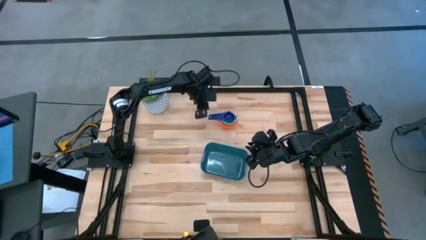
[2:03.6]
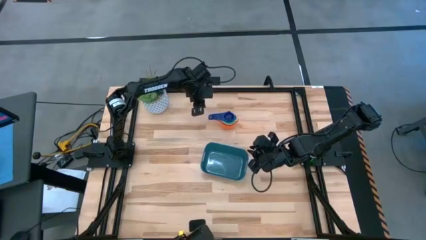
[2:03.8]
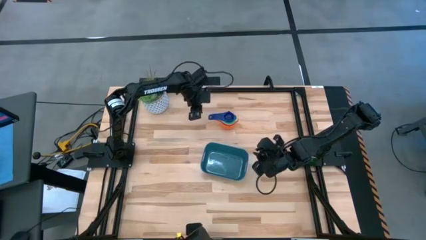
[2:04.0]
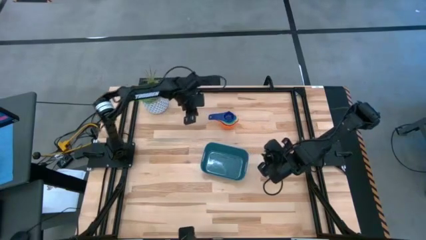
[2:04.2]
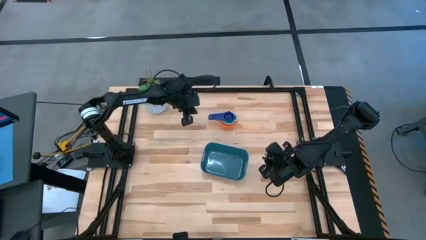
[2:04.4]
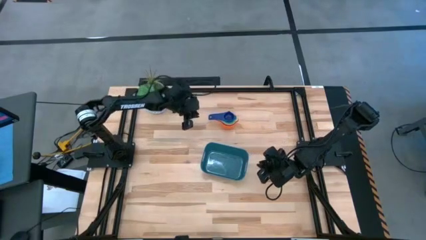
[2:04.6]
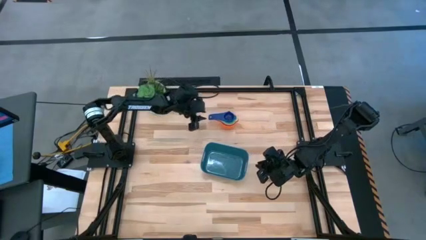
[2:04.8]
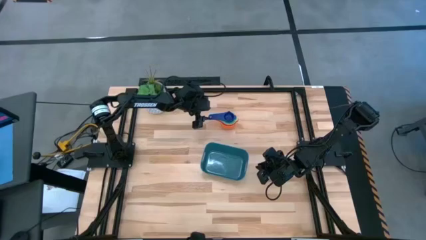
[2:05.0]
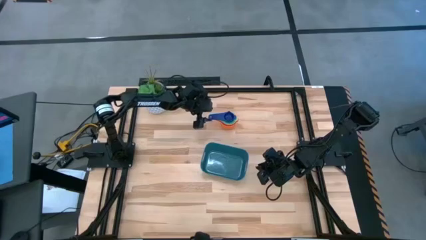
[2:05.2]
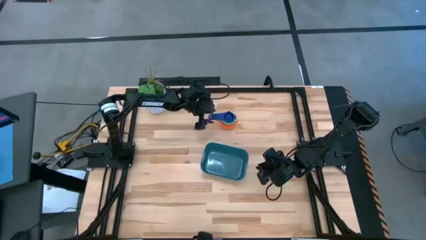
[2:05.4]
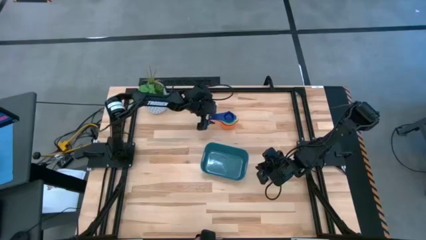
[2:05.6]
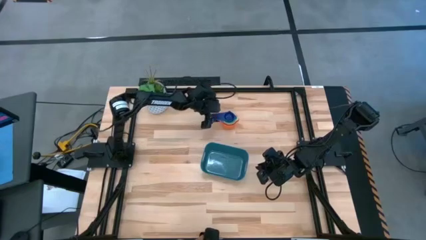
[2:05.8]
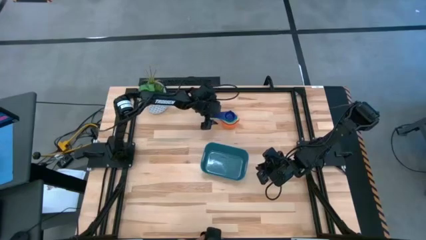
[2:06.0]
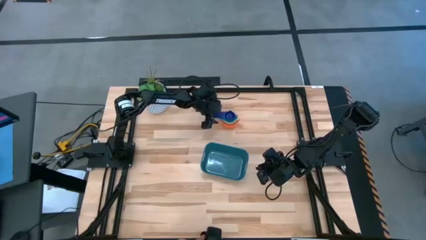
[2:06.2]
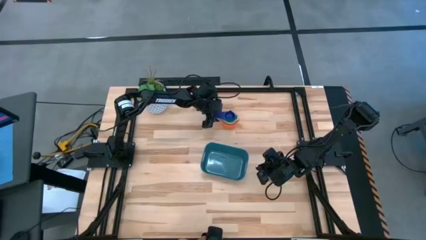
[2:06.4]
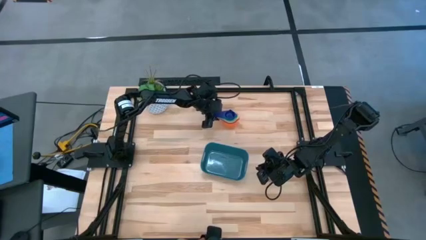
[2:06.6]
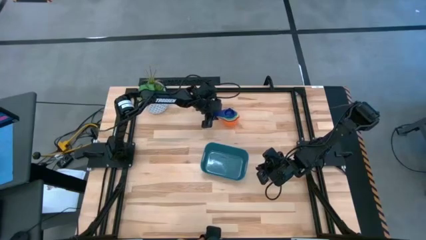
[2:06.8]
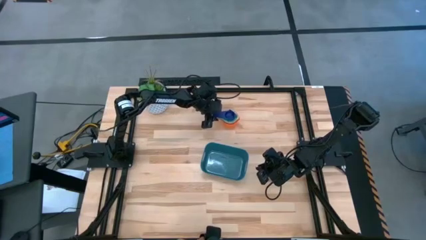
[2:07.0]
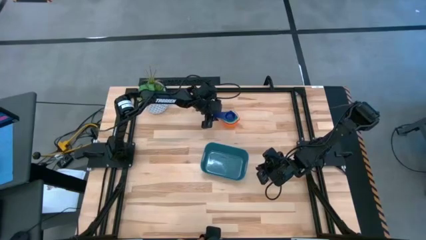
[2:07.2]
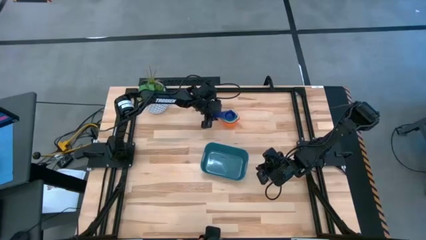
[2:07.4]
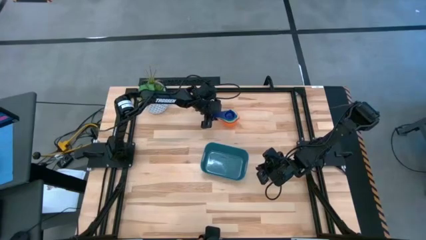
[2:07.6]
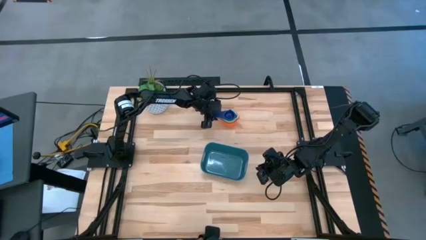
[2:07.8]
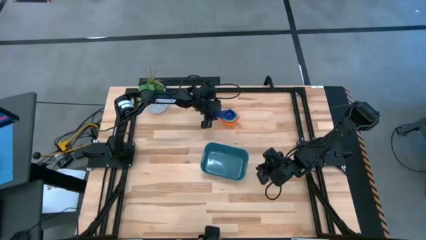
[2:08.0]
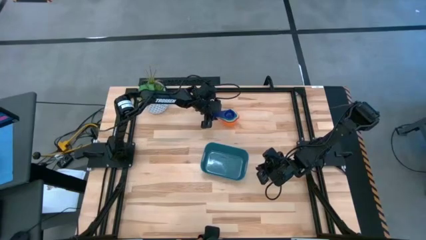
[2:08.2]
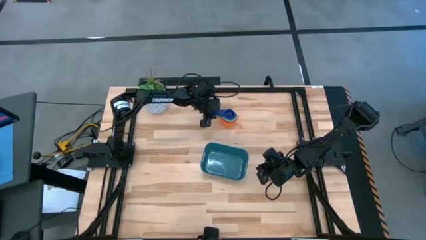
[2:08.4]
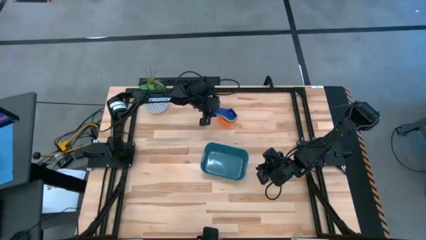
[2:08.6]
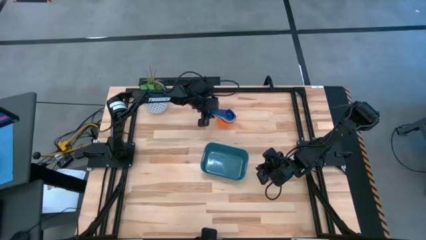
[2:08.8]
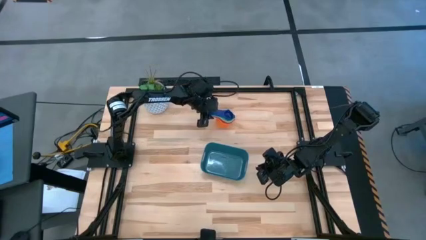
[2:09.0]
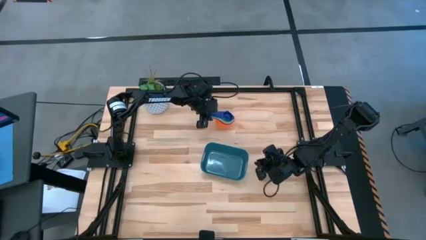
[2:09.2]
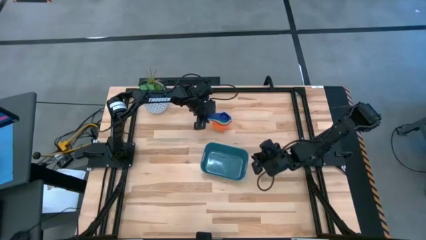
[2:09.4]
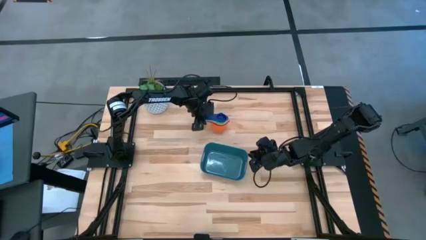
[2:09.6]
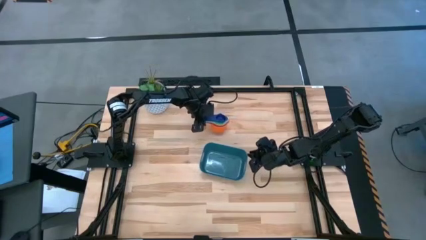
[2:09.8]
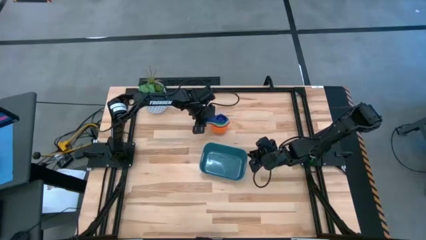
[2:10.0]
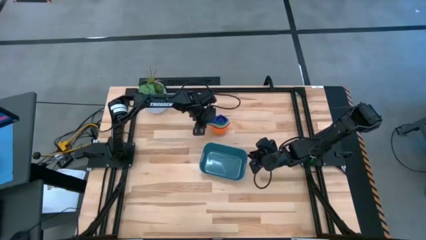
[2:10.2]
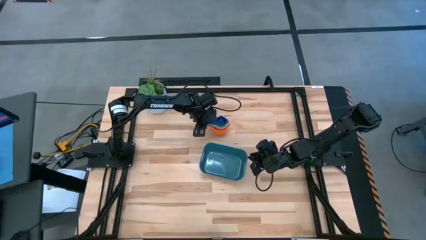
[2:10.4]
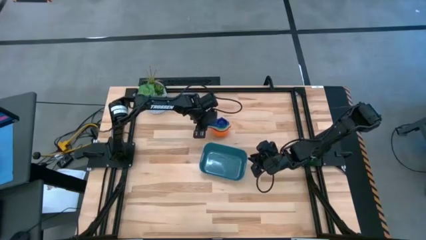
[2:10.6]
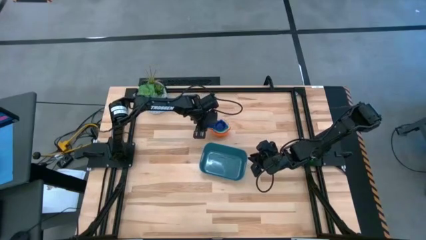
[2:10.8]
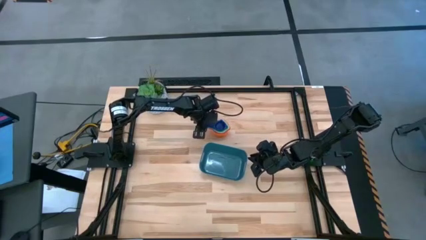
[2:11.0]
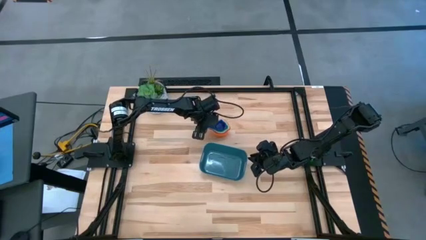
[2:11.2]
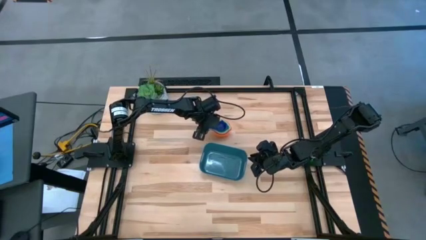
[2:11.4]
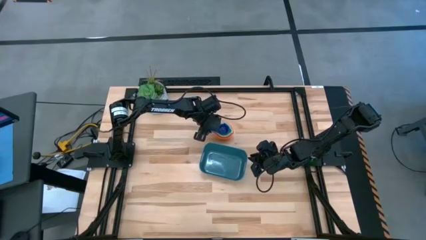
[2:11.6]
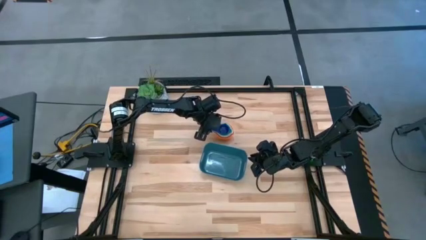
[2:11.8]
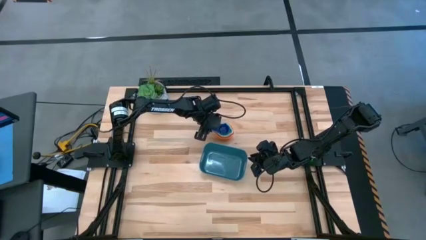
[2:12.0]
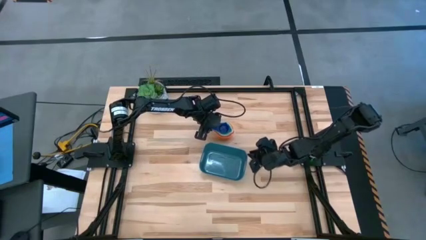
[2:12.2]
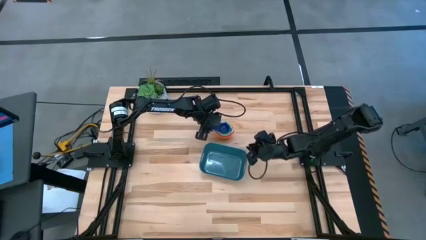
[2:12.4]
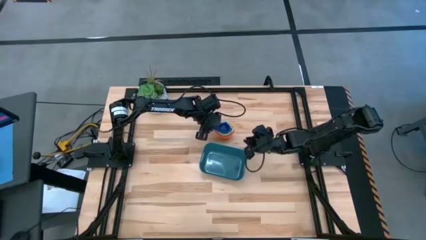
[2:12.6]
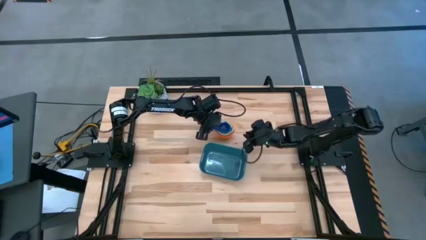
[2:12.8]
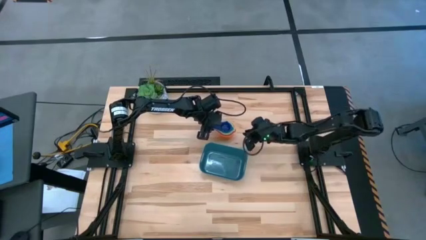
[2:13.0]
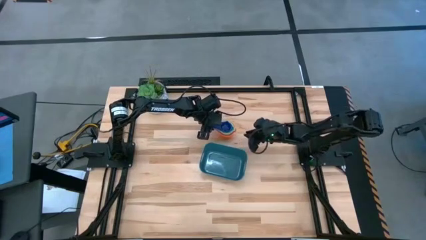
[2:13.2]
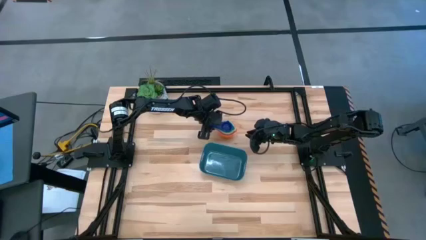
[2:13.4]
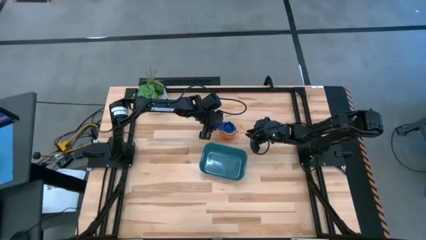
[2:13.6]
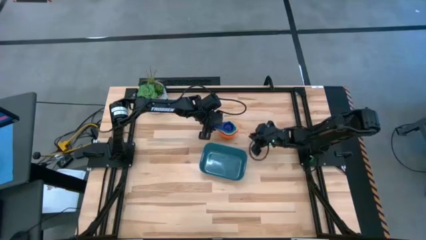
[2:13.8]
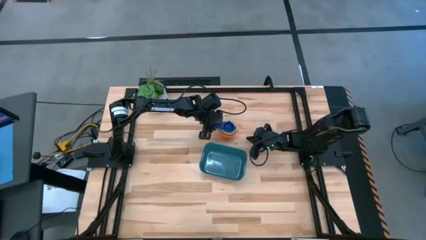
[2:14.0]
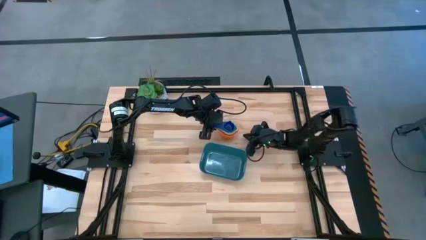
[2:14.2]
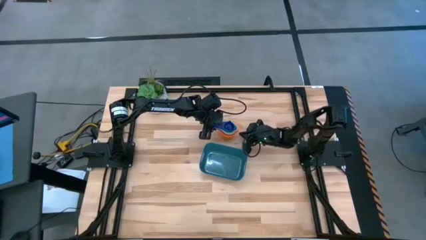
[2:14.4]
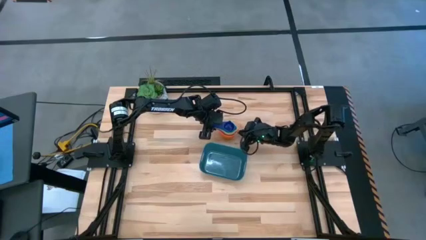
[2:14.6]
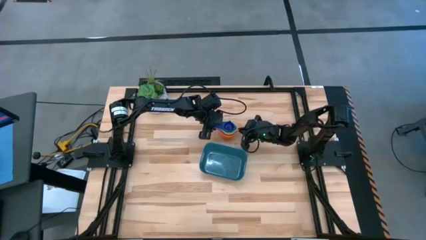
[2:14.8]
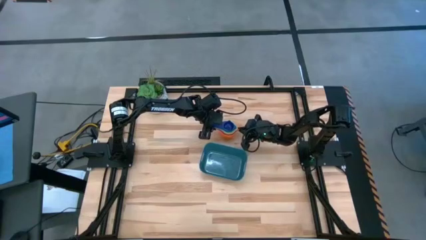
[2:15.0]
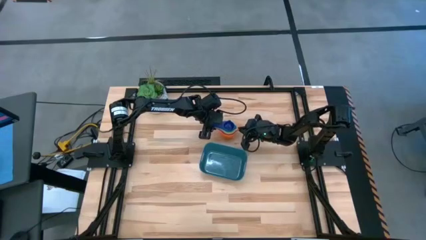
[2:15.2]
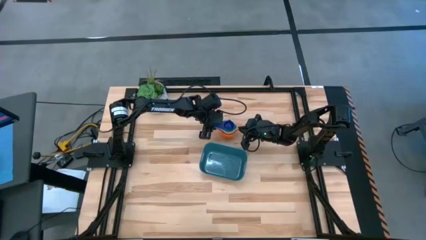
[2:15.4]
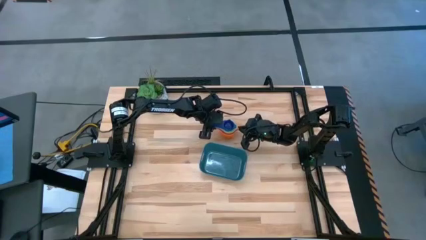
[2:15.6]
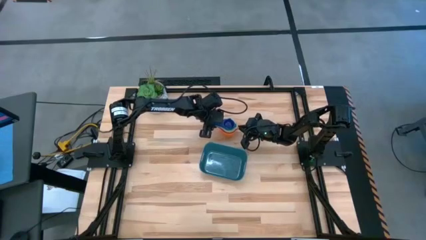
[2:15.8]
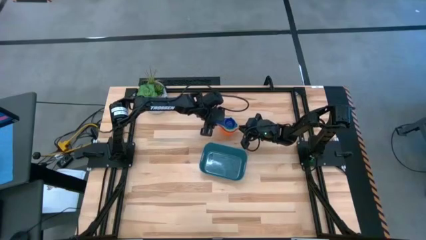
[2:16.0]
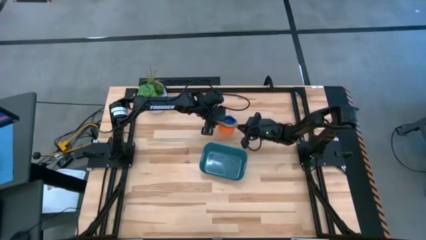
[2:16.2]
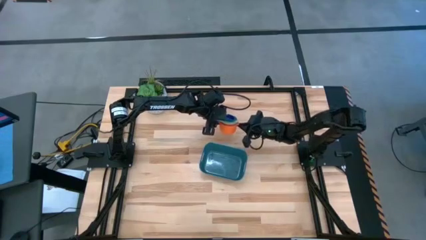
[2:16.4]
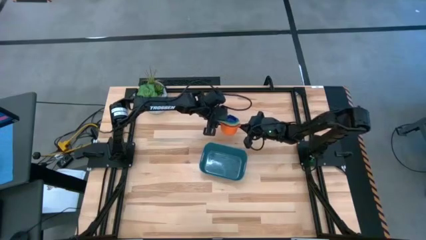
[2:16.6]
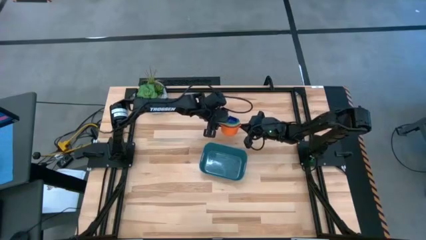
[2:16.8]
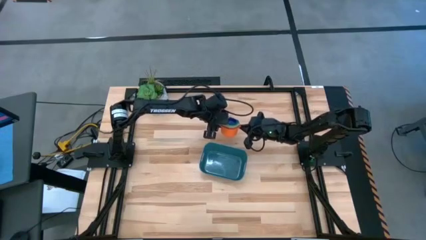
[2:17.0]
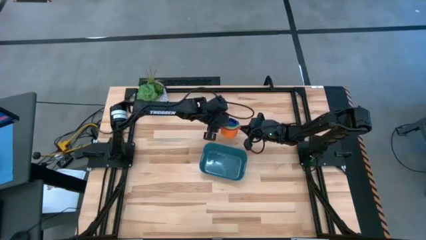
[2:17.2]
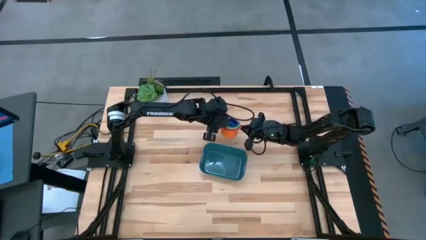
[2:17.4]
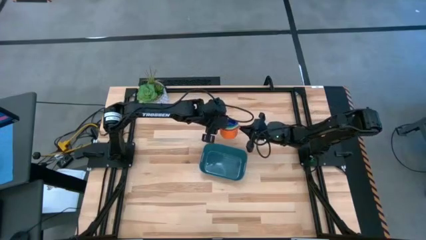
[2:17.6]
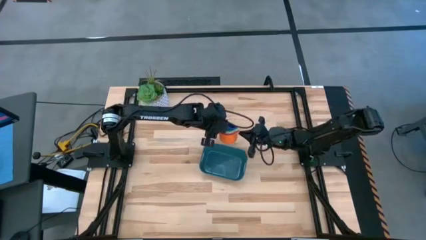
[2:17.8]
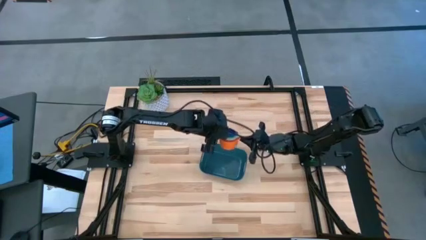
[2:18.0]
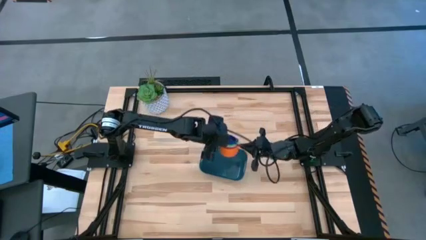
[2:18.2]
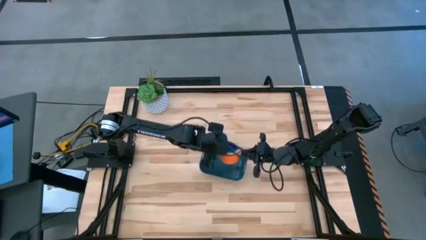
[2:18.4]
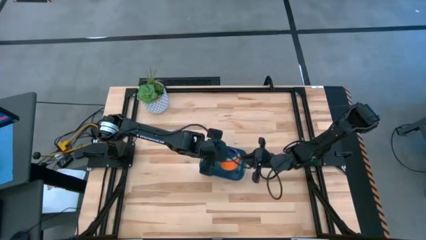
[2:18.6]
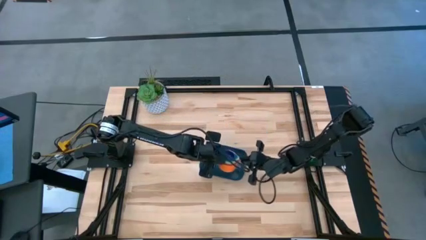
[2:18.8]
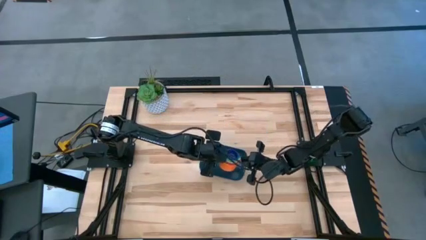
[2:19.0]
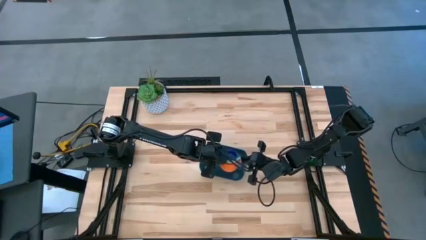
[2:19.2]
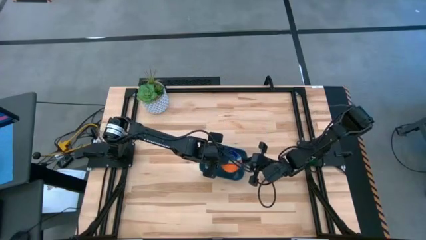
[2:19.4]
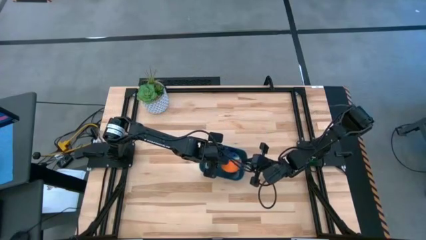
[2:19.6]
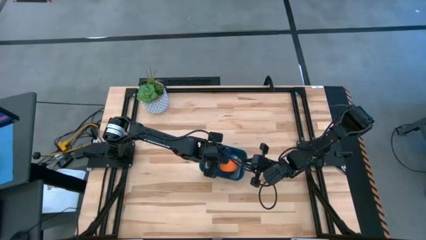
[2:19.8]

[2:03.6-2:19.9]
Task: Nest measuring cups in basket
Put the nested measuring cups into the green bin

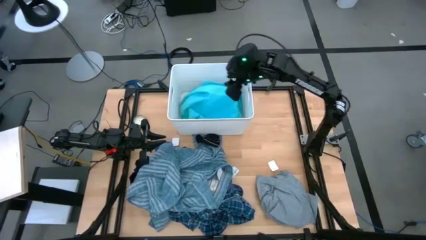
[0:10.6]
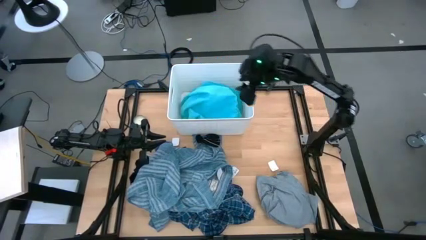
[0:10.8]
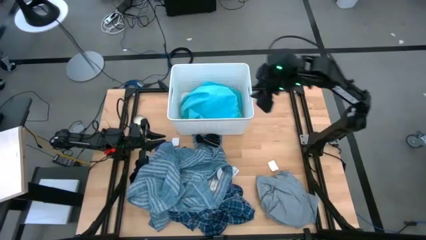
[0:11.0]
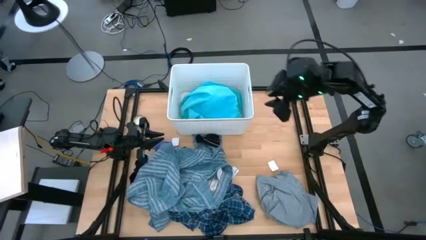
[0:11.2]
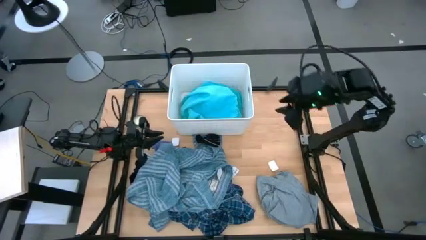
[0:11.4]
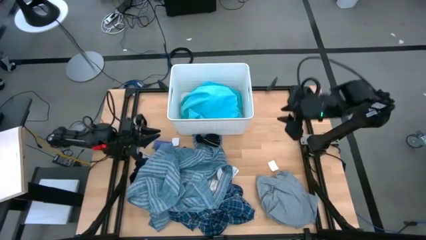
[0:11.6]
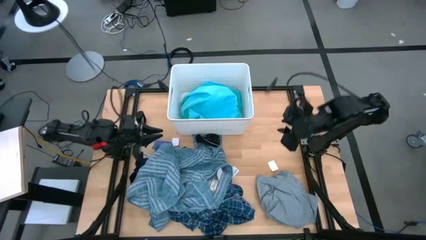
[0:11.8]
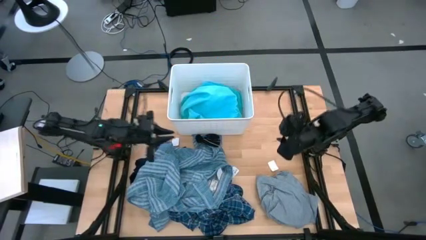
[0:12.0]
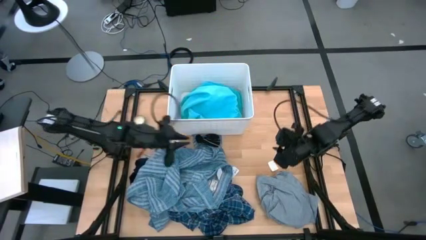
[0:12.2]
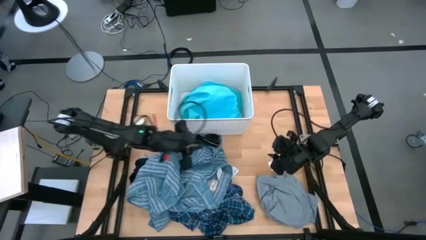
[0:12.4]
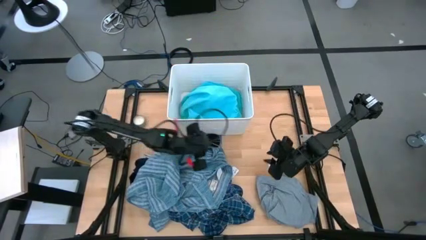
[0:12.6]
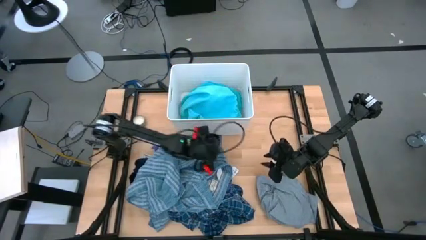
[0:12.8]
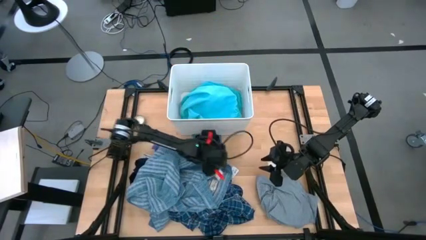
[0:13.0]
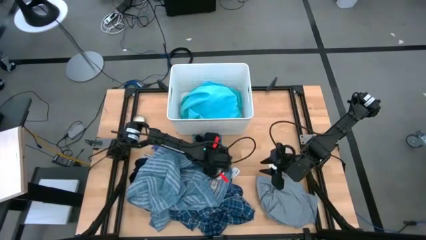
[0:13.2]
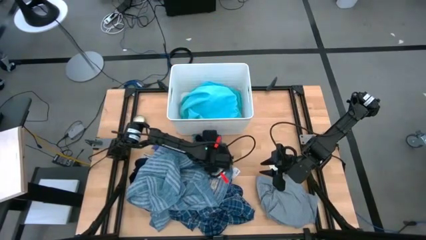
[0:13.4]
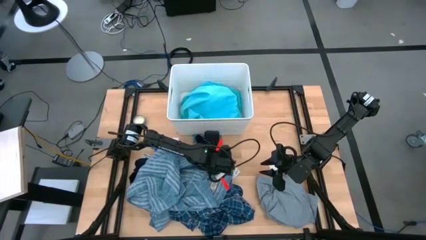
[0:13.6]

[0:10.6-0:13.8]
Task: Sort clothes
Put the right black sock into the white laundry bin
